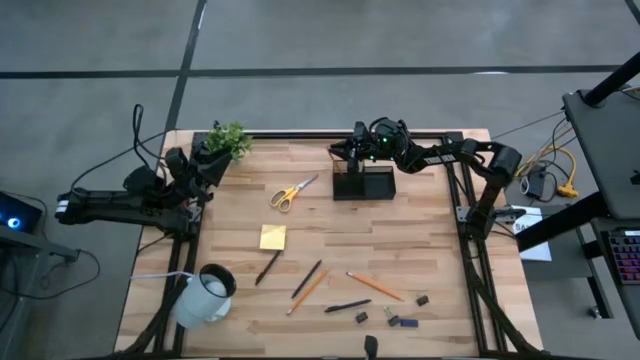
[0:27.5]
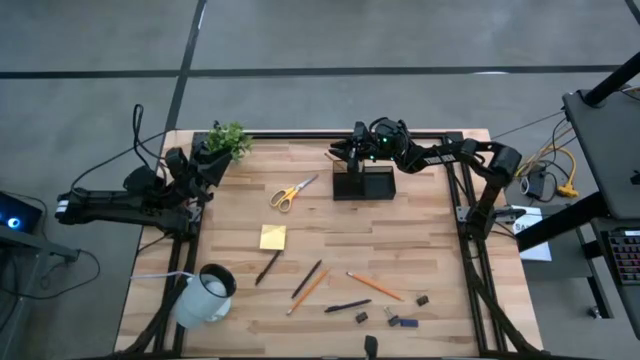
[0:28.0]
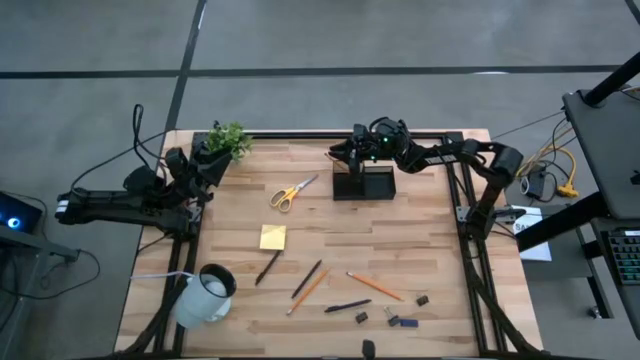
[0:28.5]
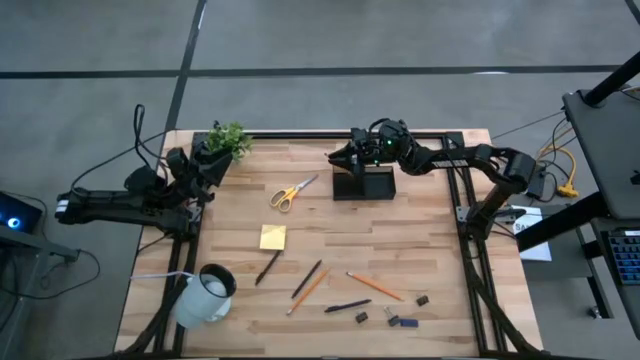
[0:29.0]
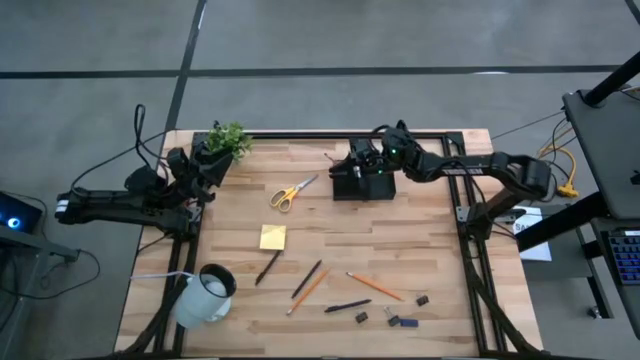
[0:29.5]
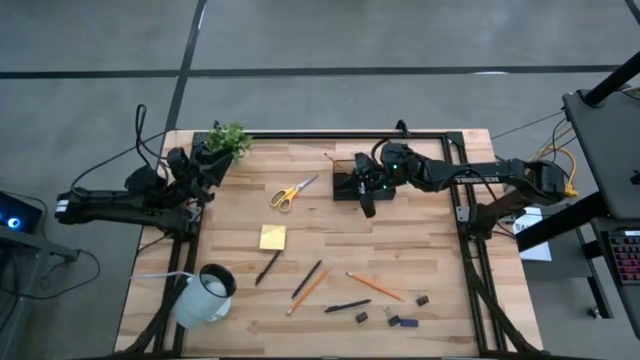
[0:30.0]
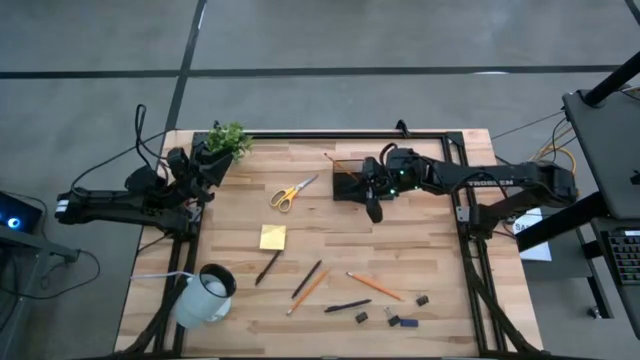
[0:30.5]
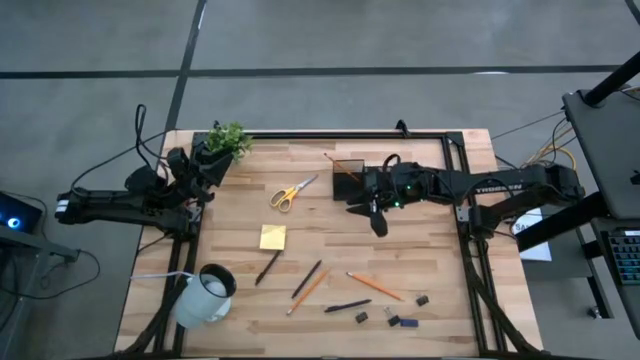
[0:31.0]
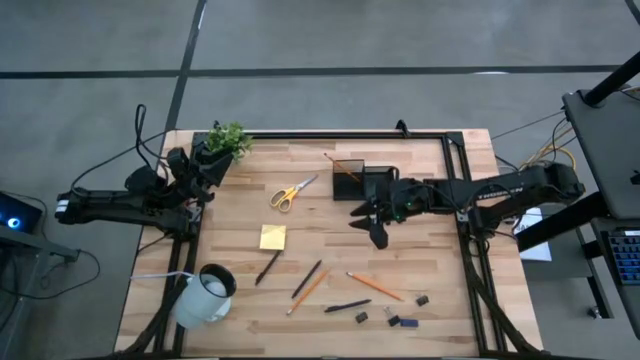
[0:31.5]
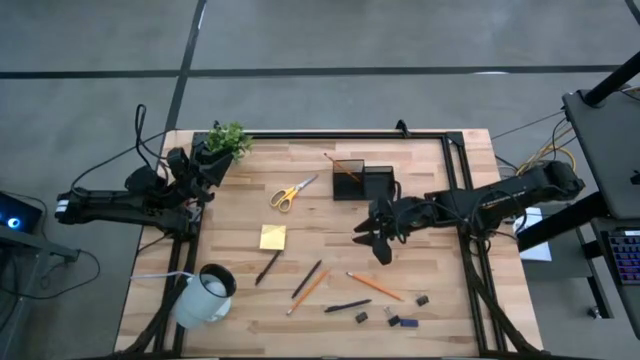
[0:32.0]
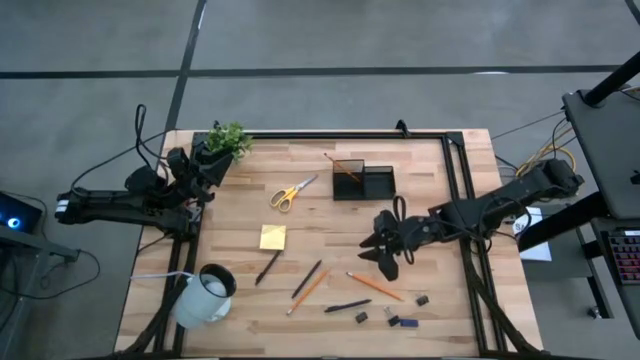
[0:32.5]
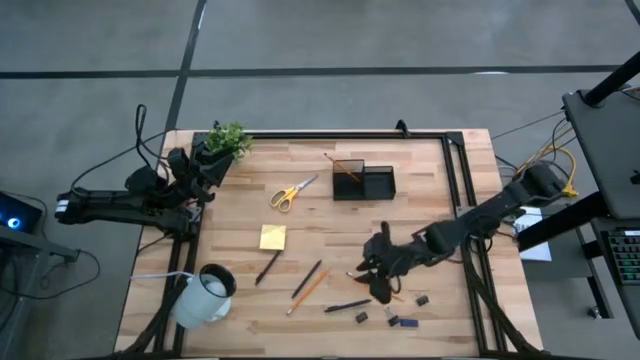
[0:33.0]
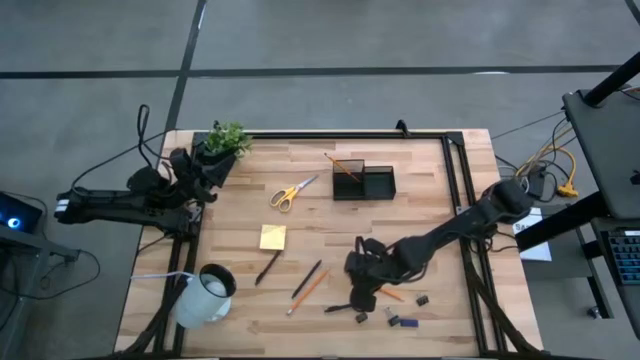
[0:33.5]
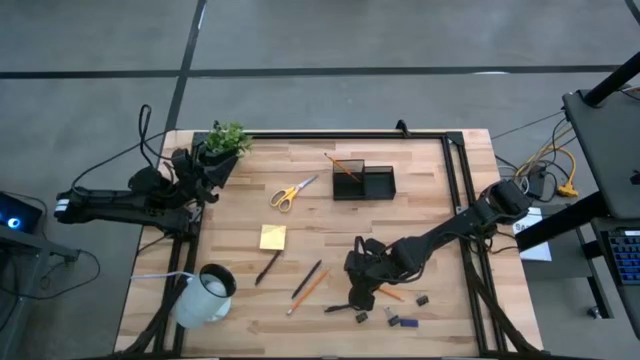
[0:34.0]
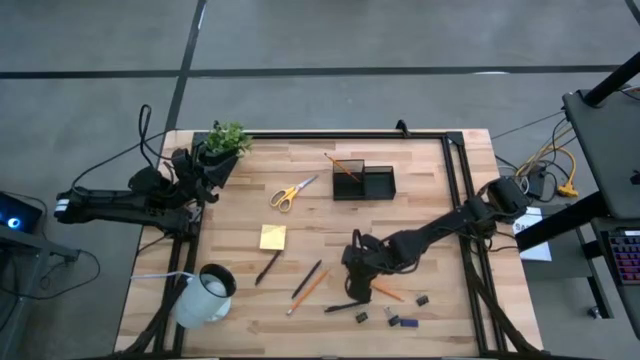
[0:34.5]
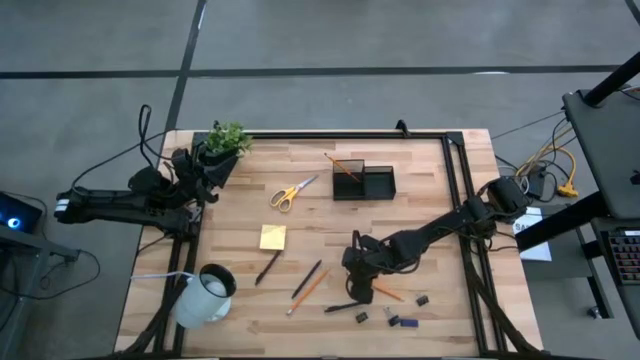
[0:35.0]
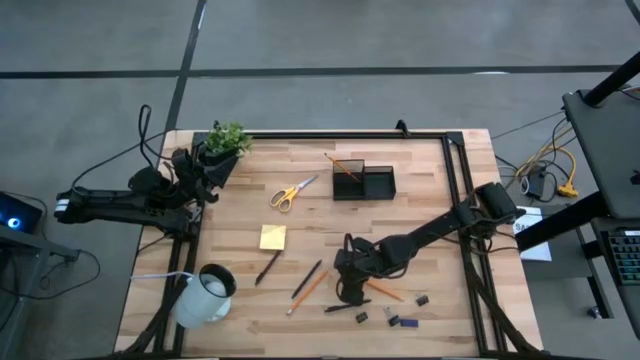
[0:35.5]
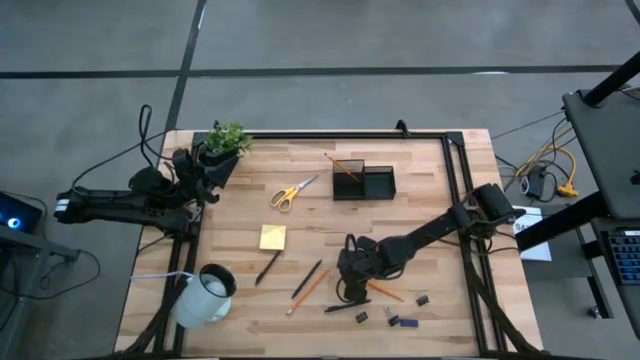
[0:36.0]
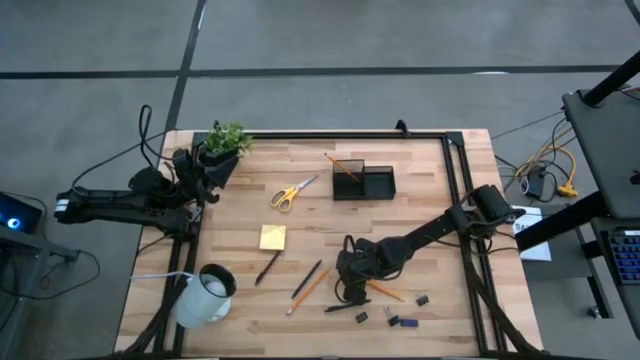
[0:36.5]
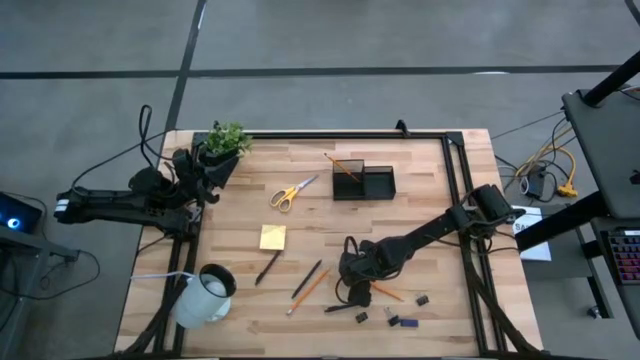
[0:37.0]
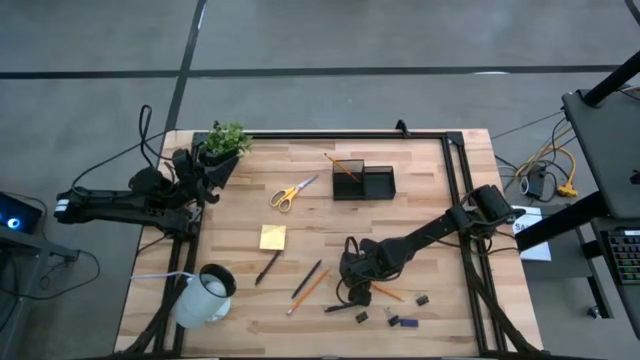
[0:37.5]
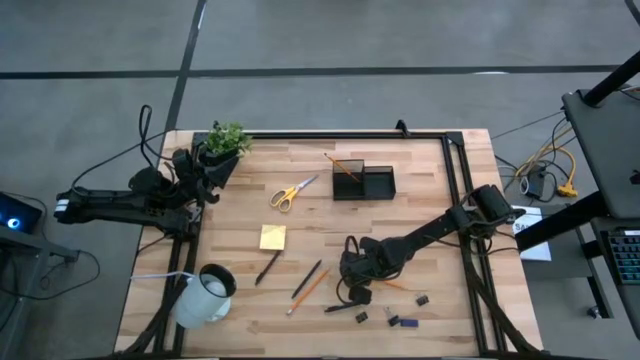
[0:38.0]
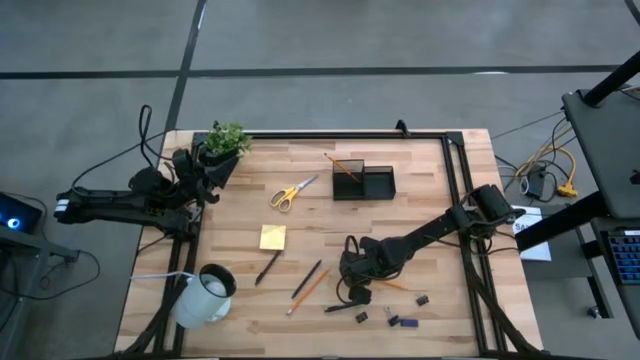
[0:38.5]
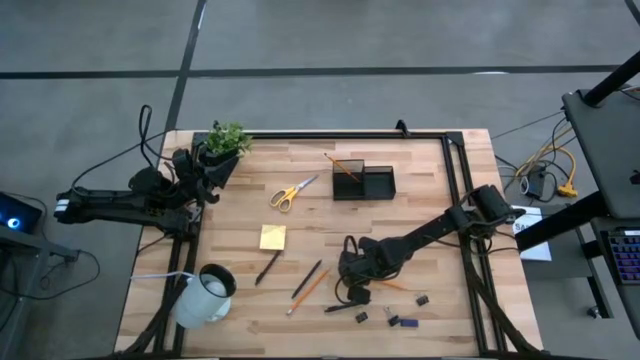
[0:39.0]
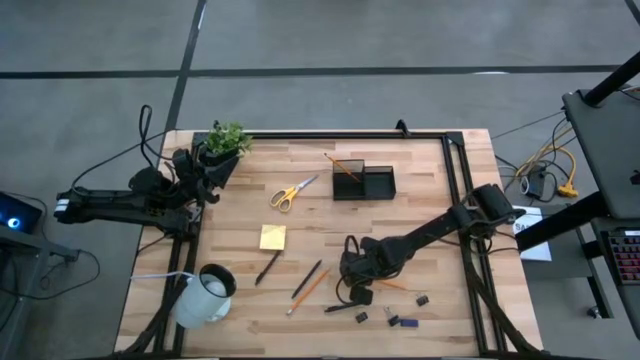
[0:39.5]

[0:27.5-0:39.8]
Task: Pick and place office supplies into organizer
Put the right pencil into the desk organizer

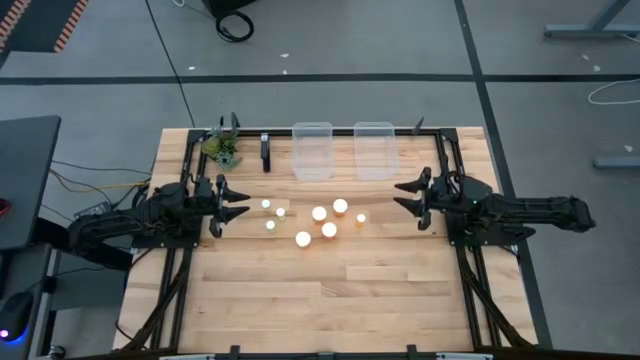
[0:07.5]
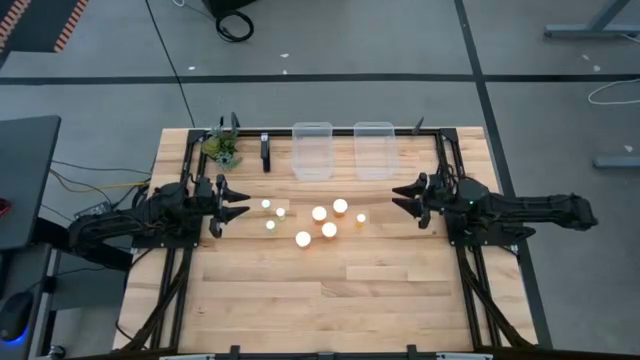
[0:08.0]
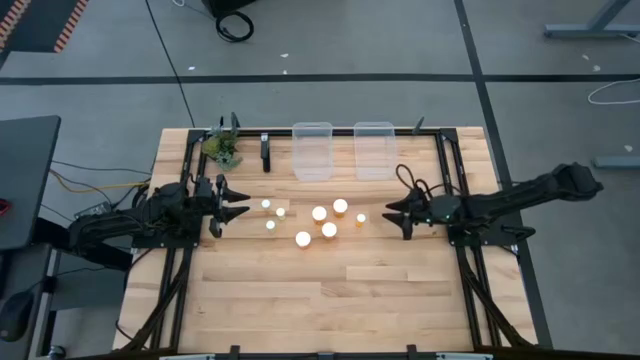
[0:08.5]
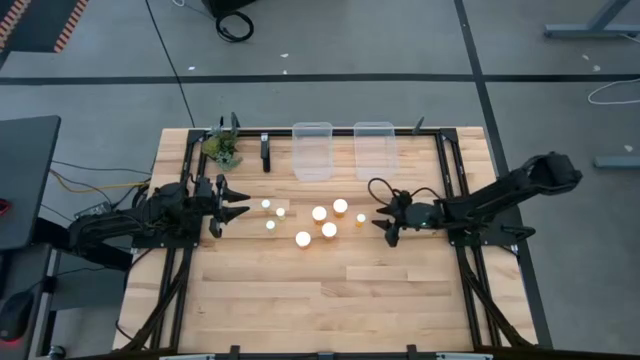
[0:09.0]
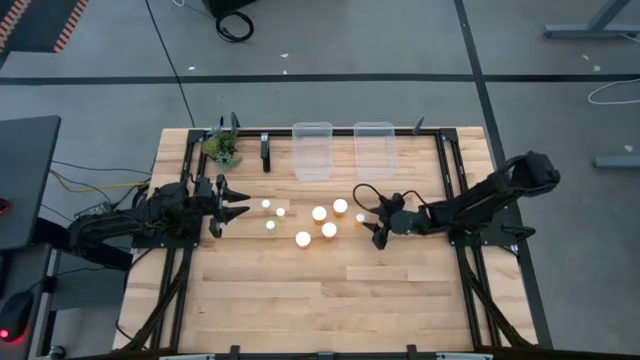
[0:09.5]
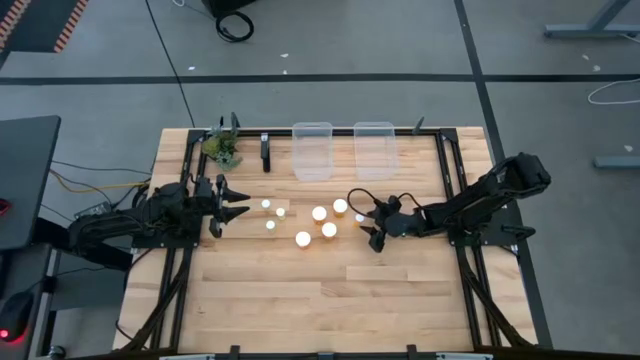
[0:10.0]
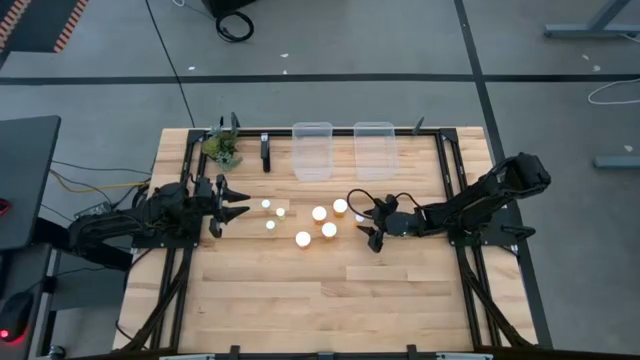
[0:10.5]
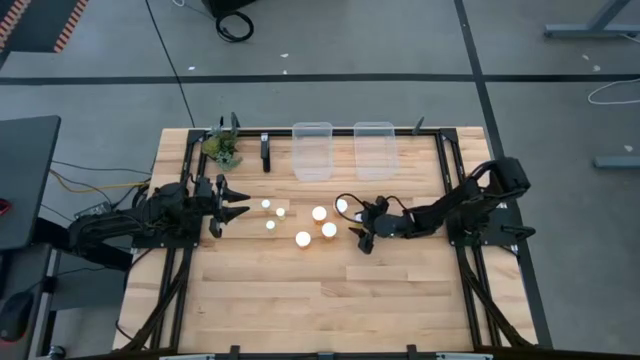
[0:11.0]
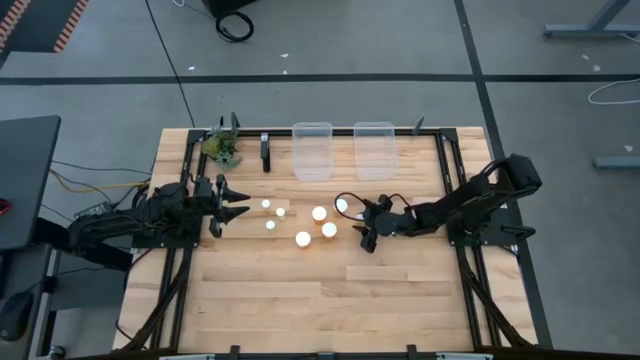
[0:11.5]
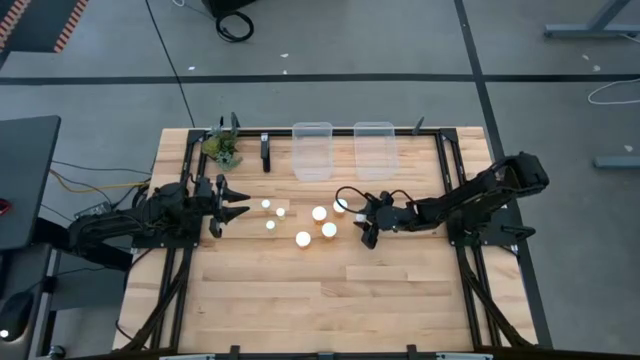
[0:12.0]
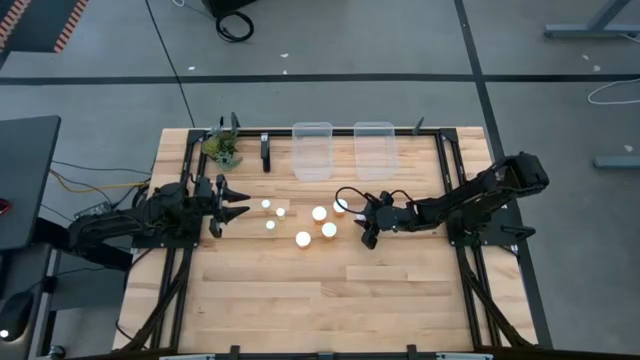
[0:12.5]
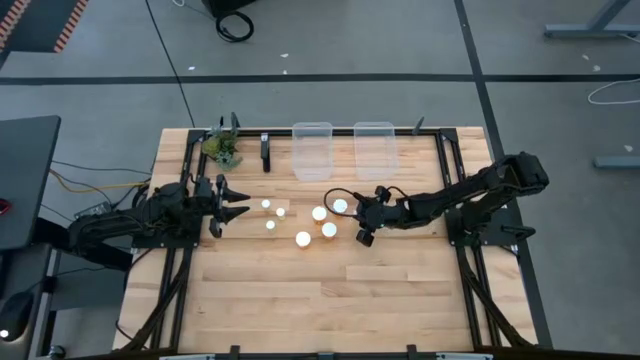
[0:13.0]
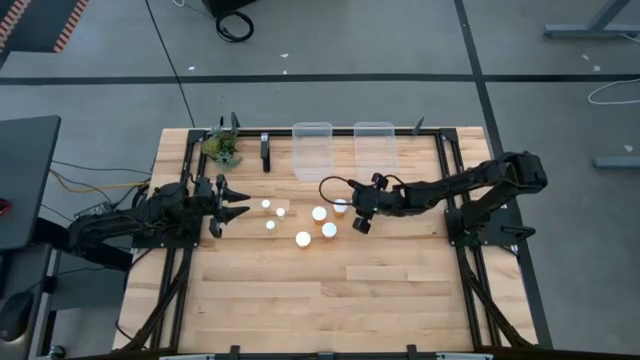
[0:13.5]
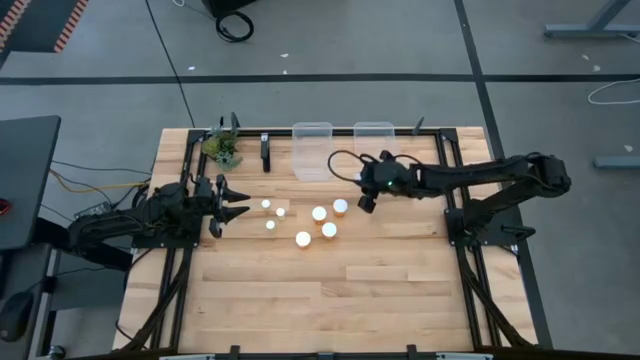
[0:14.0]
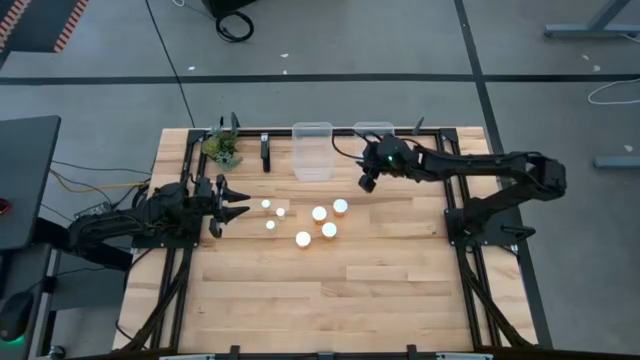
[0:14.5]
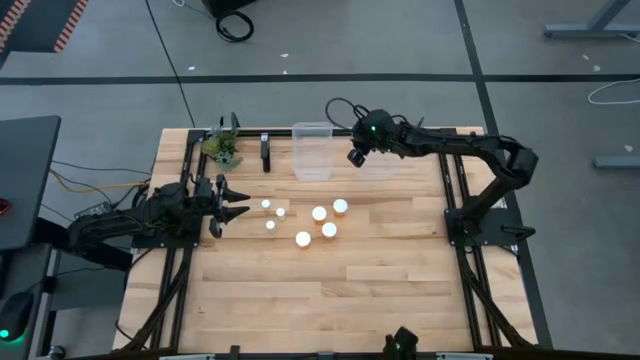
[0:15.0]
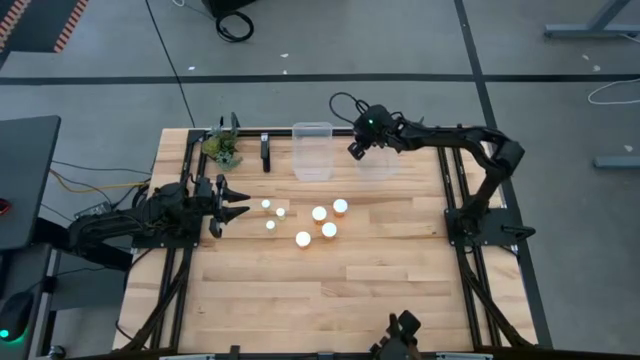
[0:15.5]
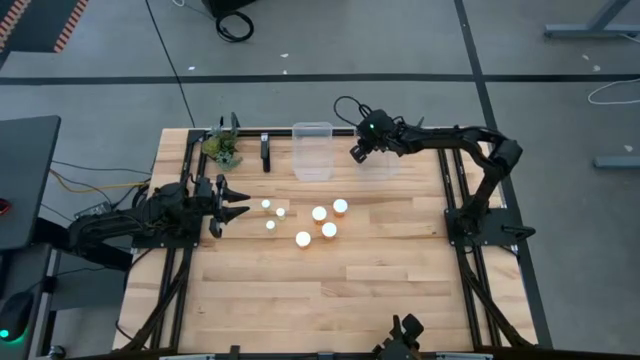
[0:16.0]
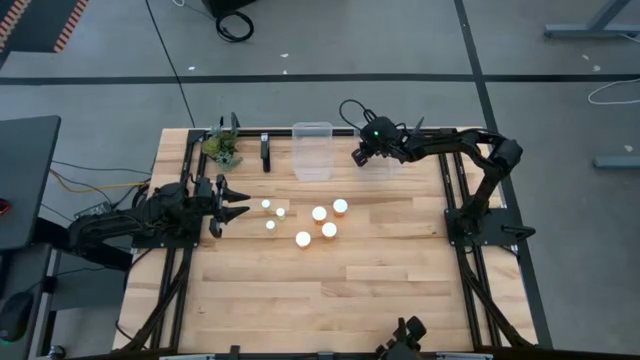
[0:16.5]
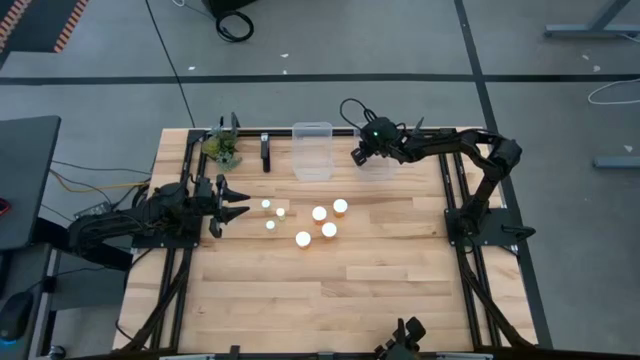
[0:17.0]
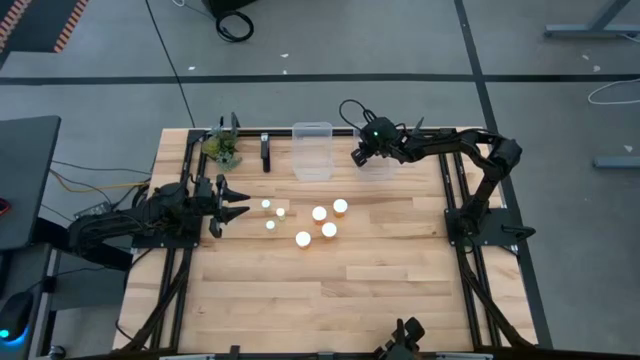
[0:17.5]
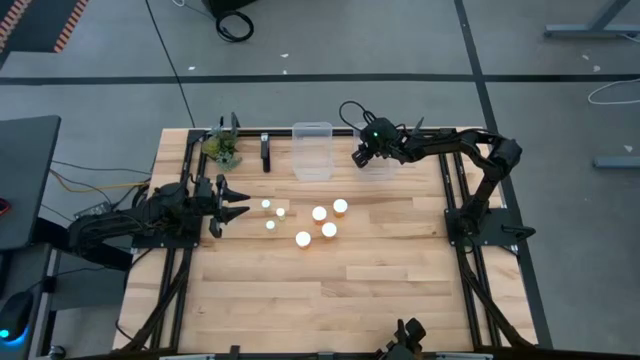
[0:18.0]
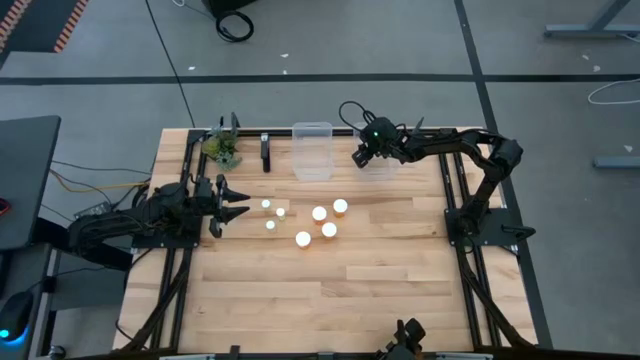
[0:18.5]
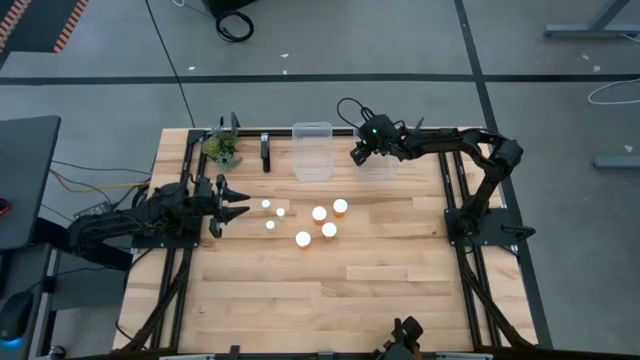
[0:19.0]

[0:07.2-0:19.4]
Task: Pick and place medicine bottles into bin by pill shape (circle, oval)
Put the small orange pill bottle into the right transparent bin
